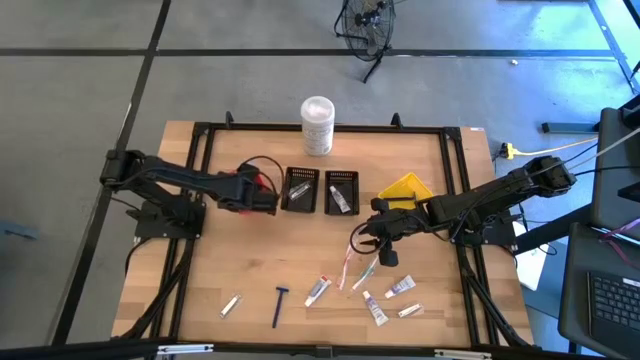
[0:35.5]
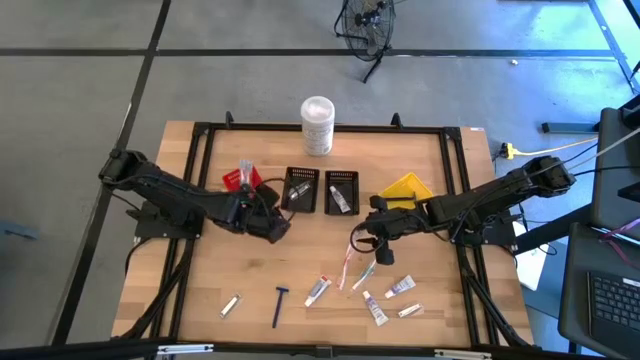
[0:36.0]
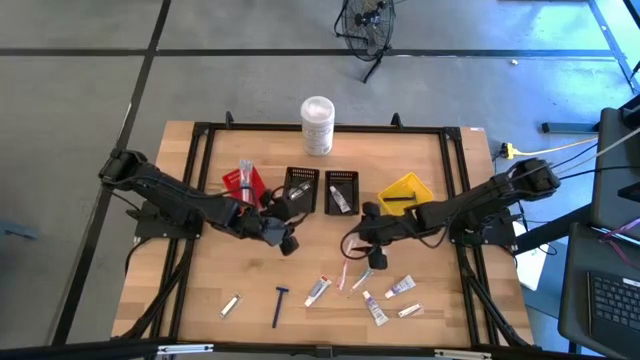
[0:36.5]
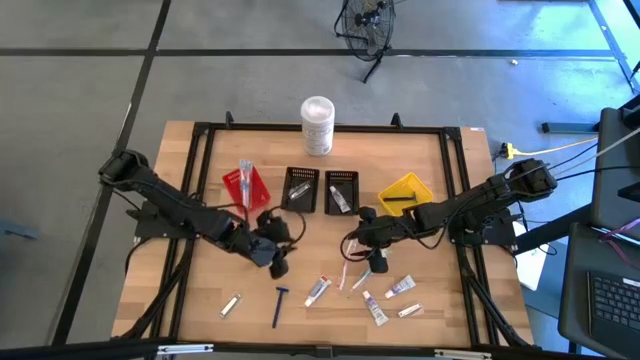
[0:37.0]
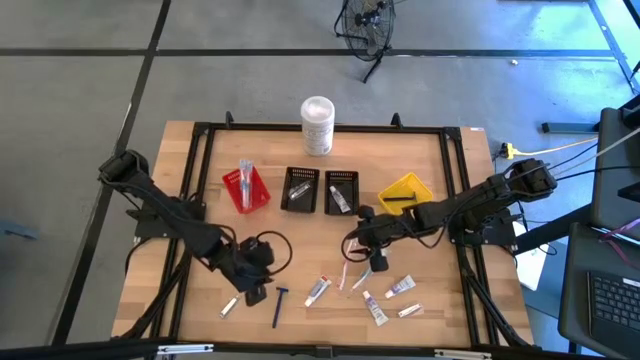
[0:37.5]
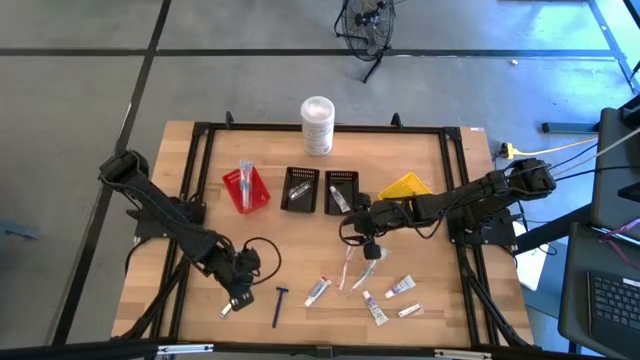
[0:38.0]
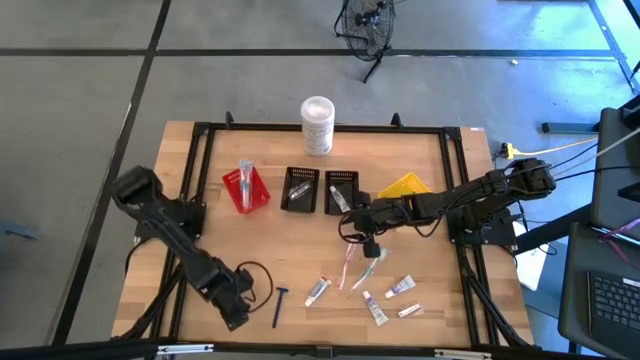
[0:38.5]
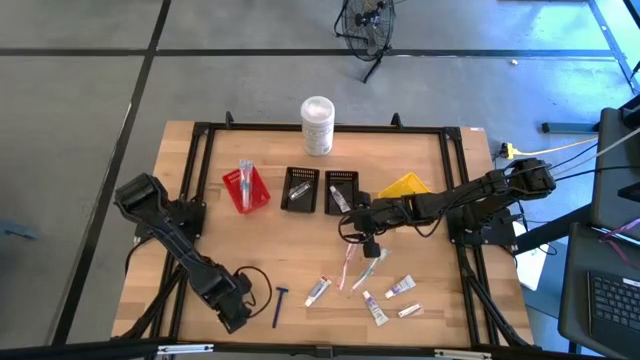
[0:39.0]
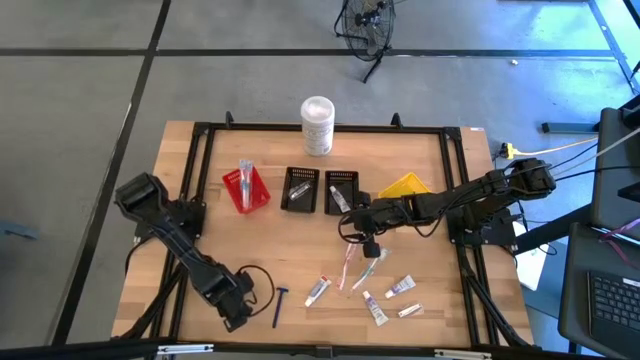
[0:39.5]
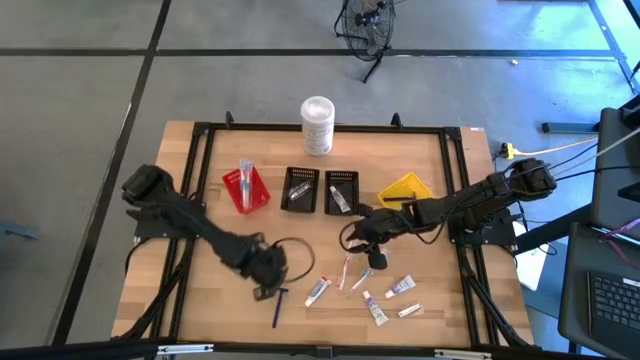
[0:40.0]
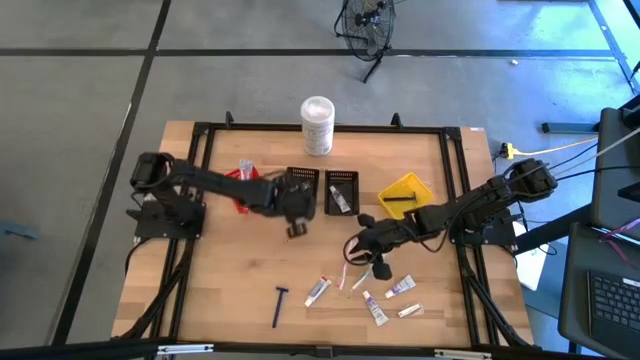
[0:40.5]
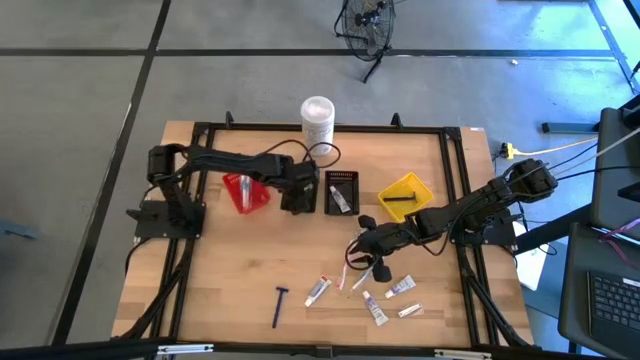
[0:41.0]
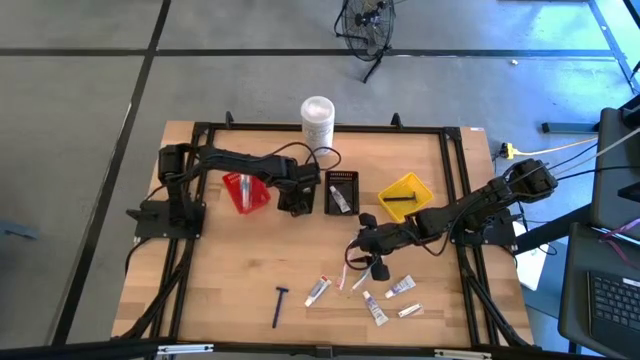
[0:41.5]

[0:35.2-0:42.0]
Task: Pick & Place Travel size toiletries
Put the silver nail cutter into the left black bin

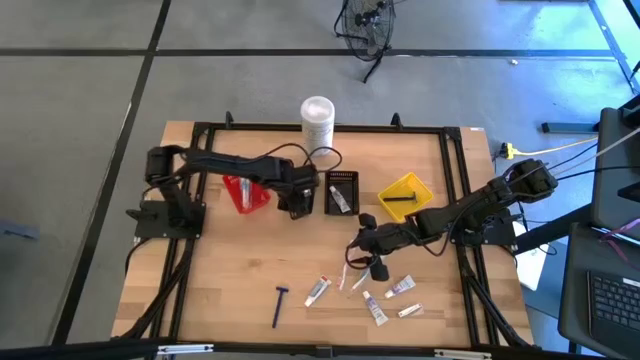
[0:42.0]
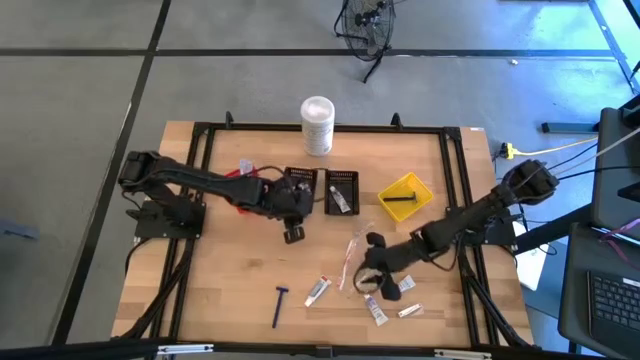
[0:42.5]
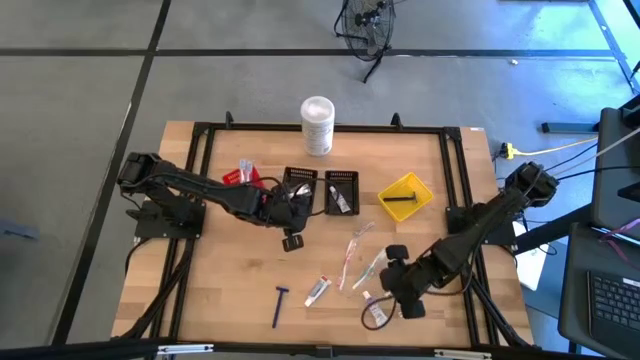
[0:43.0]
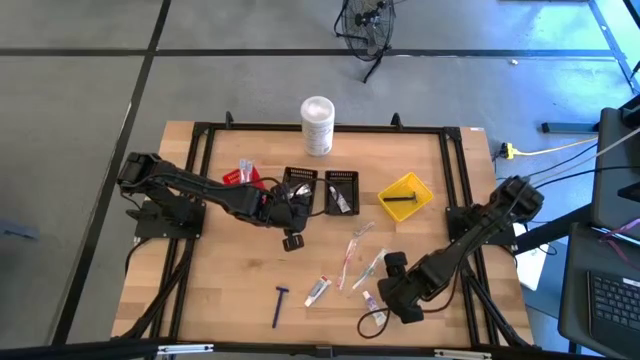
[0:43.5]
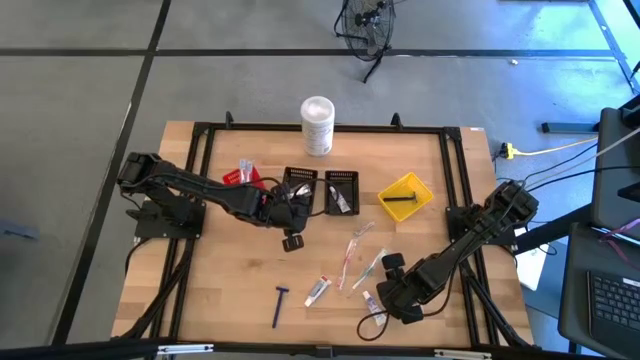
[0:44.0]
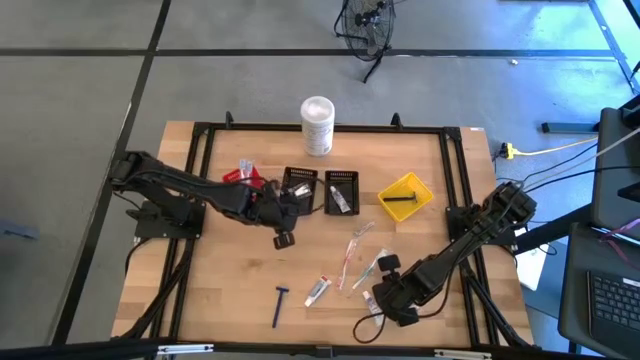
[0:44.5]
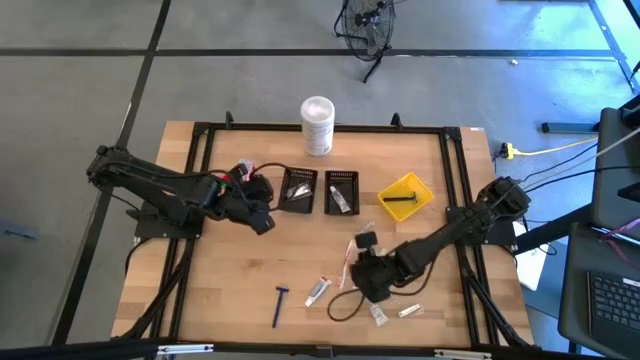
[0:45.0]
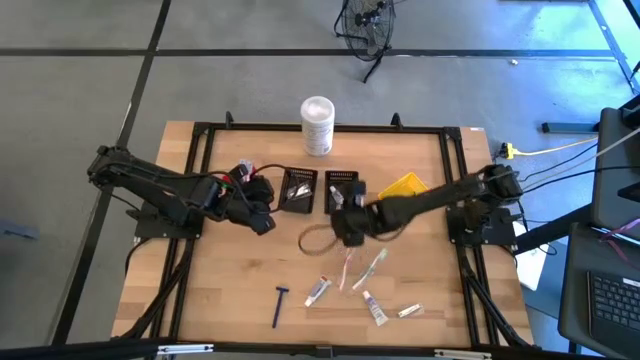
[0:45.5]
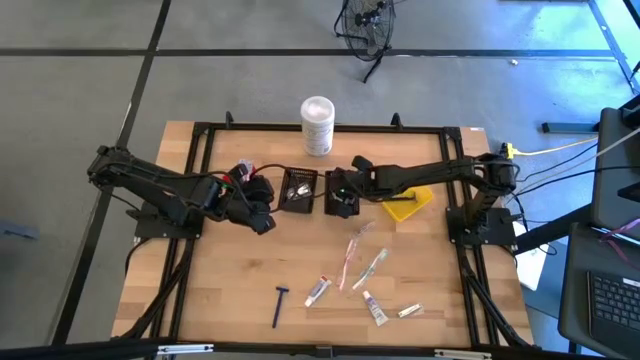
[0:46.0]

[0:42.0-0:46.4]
Put the white toothpaste into the right black bin

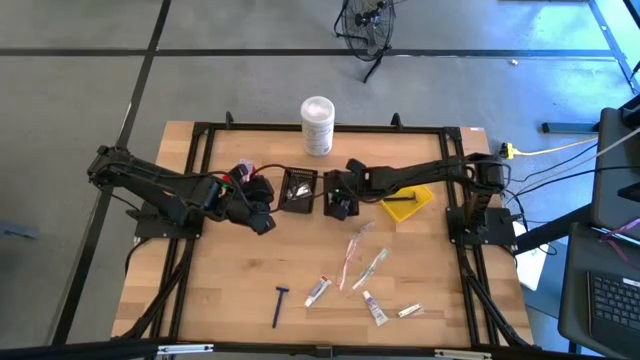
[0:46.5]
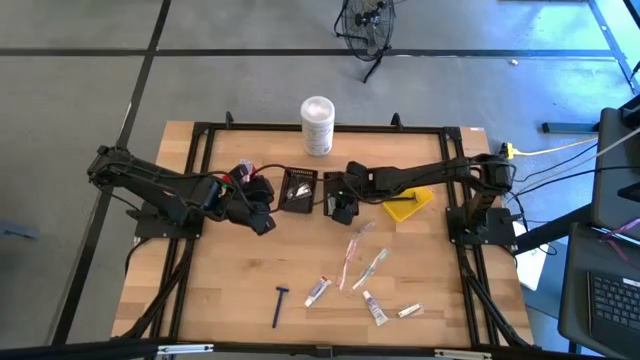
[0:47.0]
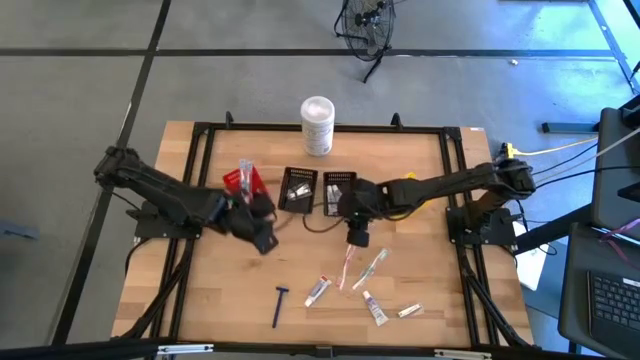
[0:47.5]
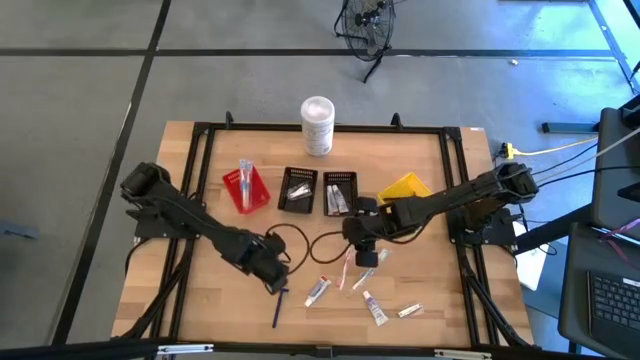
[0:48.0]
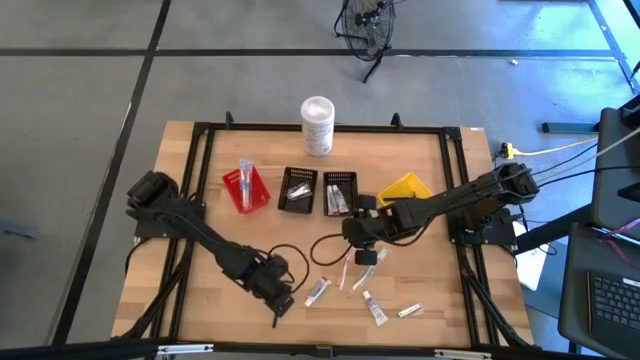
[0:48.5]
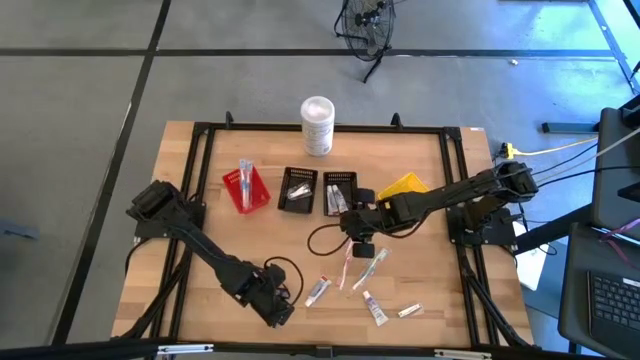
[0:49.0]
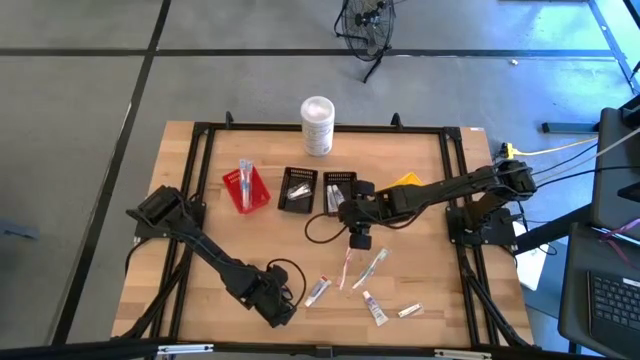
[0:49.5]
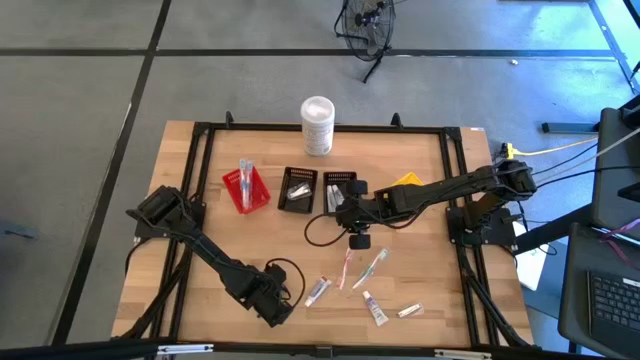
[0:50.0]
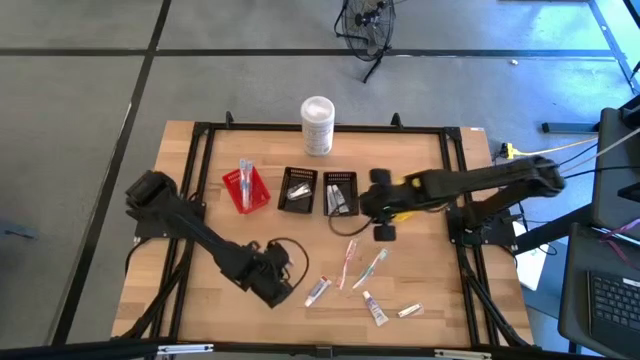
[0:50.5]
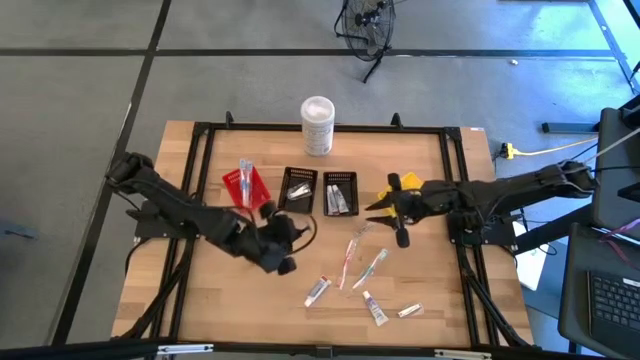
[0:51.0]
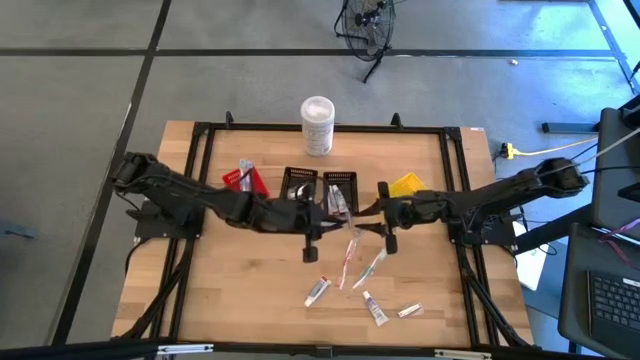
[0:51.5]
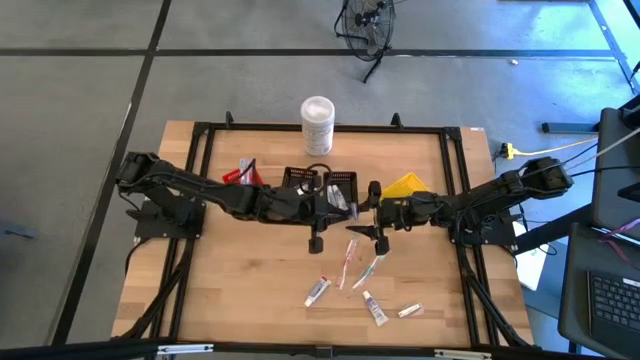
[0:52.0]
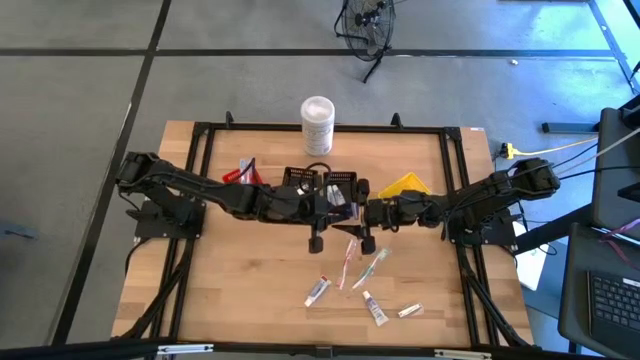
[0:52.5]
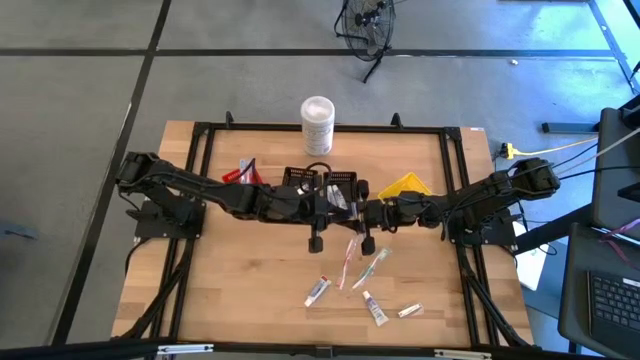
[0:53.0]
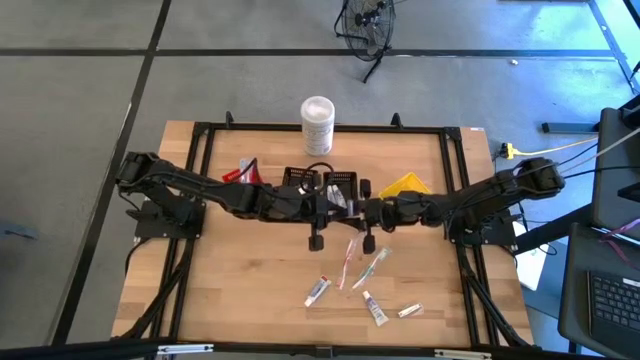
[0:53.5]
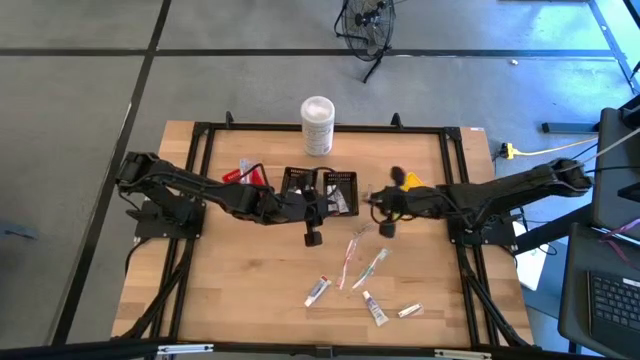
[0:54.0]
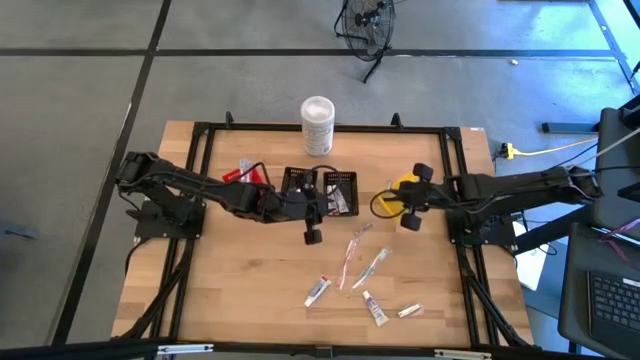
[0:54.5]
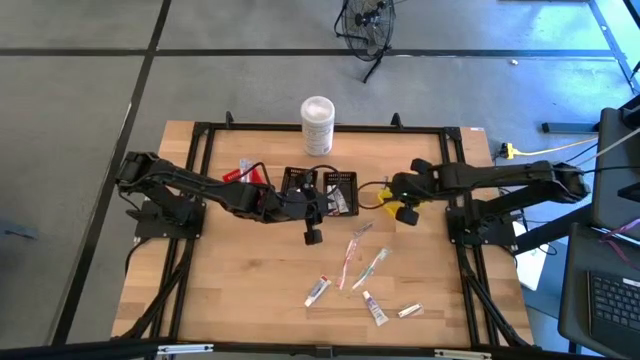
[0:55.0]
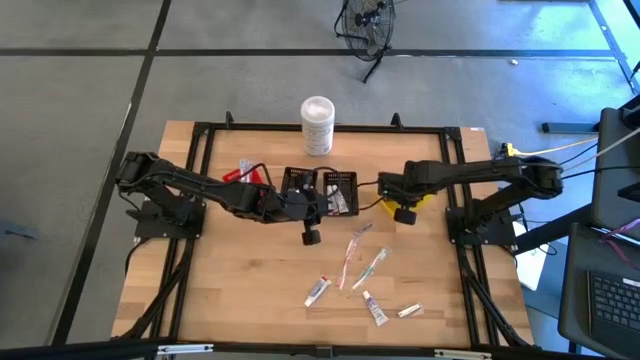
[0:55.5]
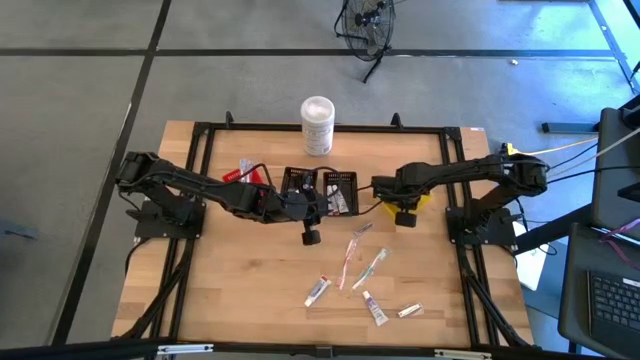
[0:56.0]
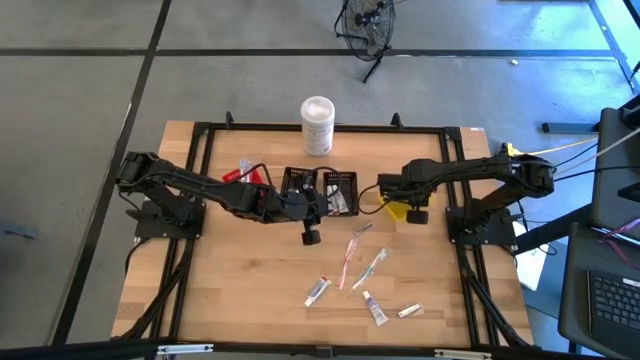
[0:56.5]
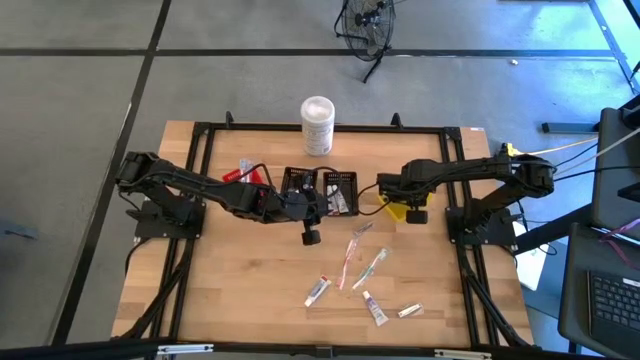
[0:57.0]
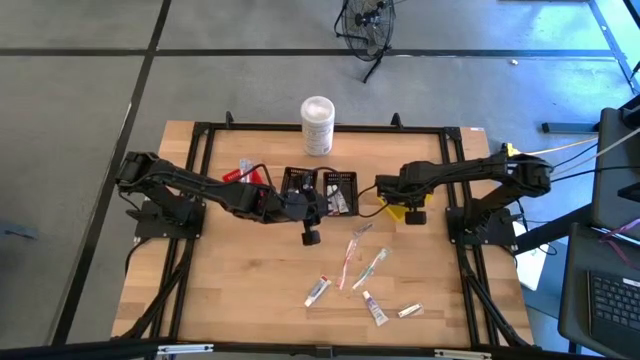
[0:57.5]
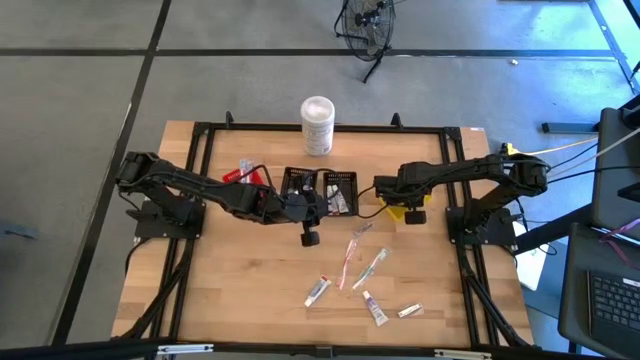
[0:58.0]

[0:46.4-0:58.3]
Put the blue razor into the yellow bin
